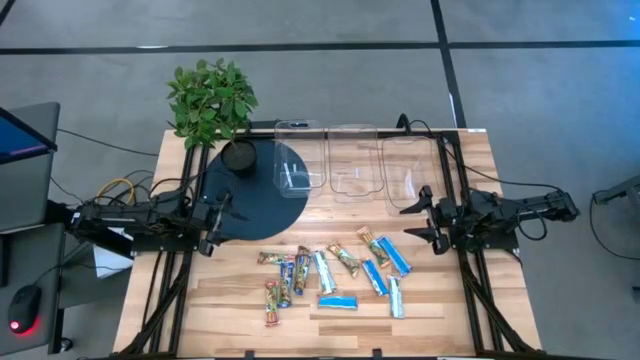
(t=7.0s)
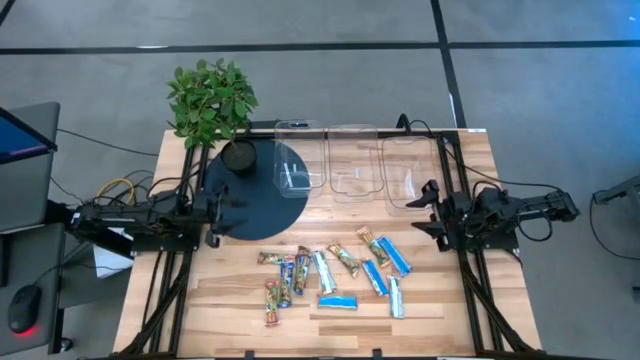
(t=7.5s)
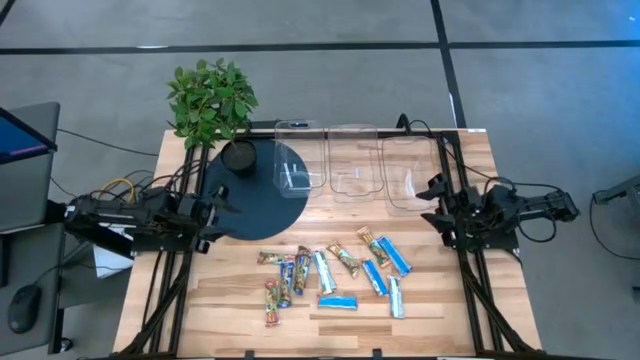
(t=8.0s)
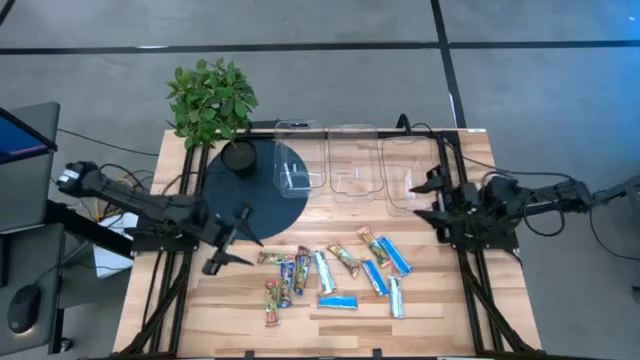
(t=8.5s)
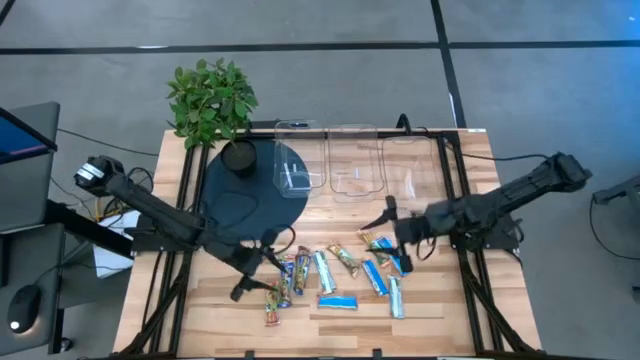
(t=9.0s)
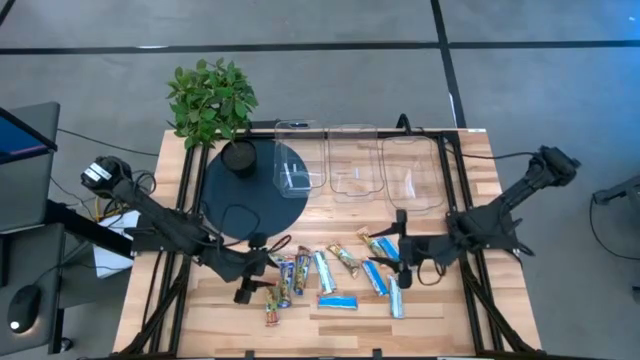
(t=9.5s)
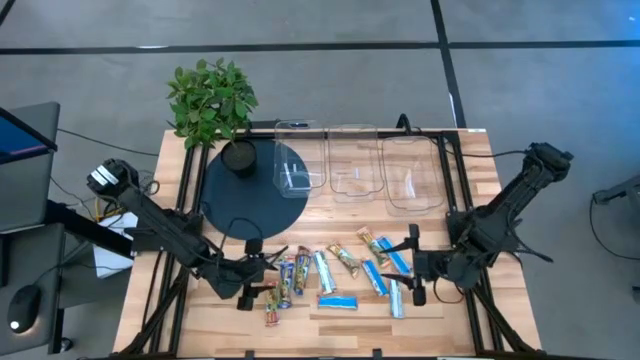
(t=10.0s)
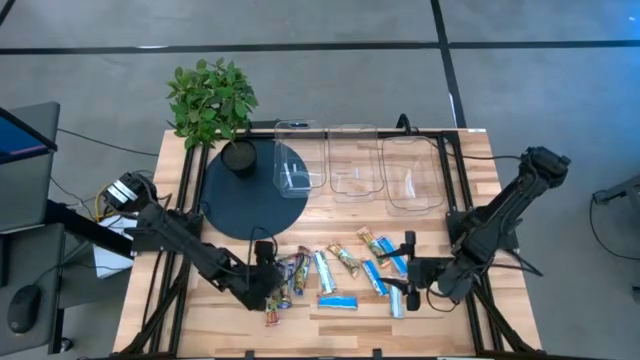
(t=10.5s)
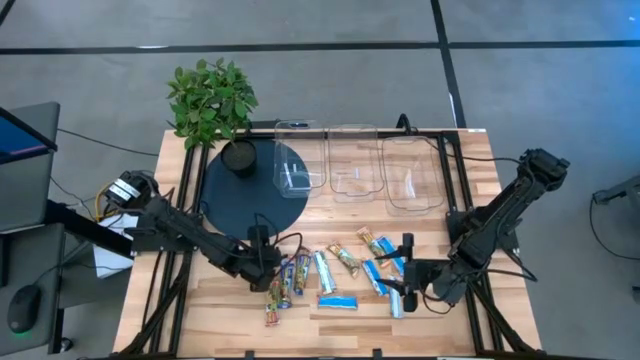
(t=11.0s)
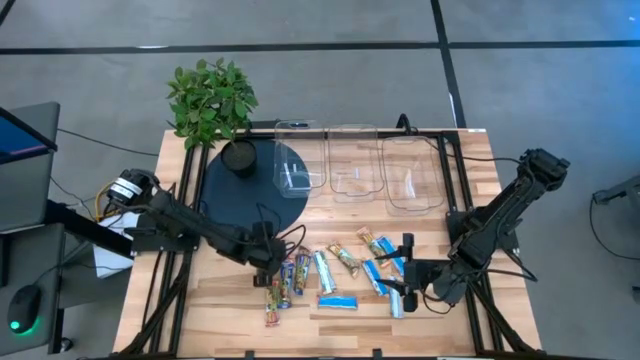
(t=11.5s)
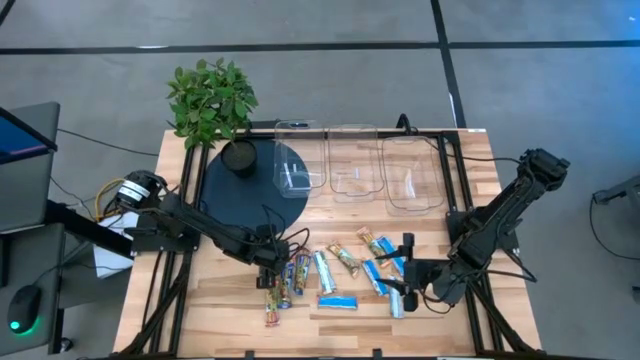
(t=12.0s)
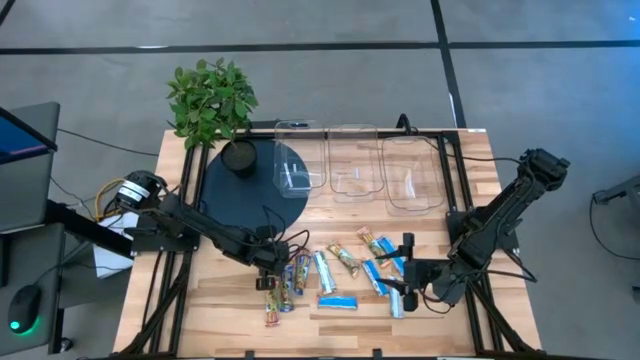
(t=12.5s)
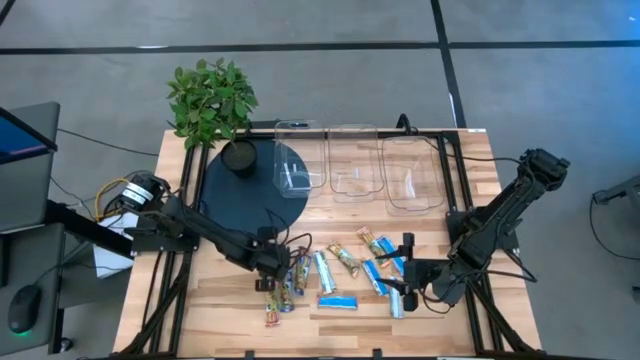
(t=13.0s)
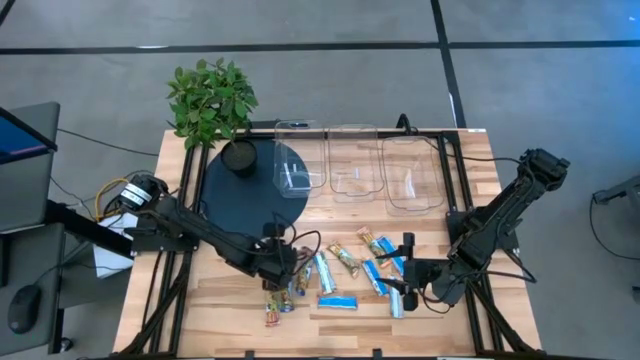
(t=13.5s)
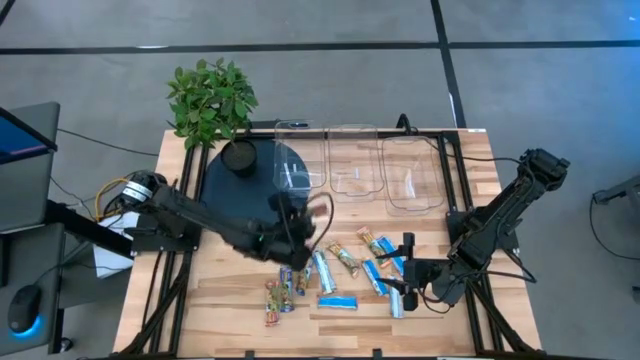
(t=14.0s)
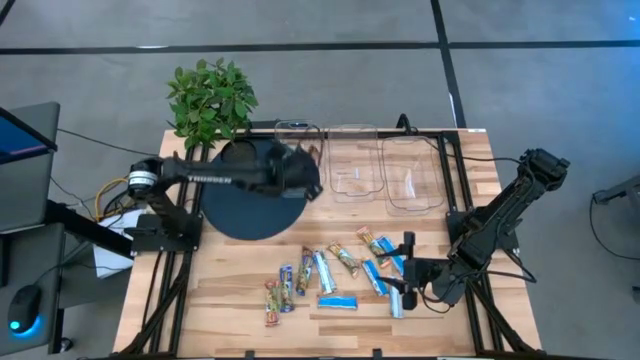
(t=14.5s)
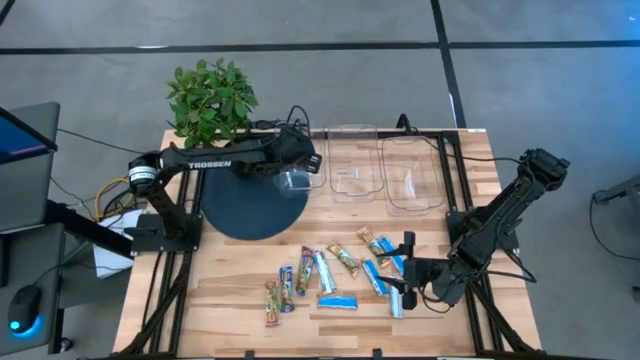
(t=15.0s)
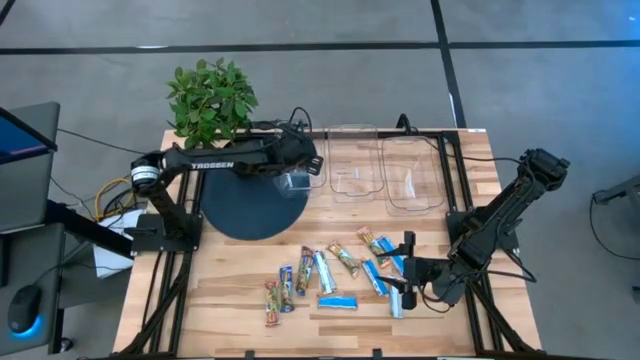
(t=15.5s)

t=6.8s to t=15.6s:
Task: Pick and place Granola Bars by type
Put the red granola bar into the left transparent bin

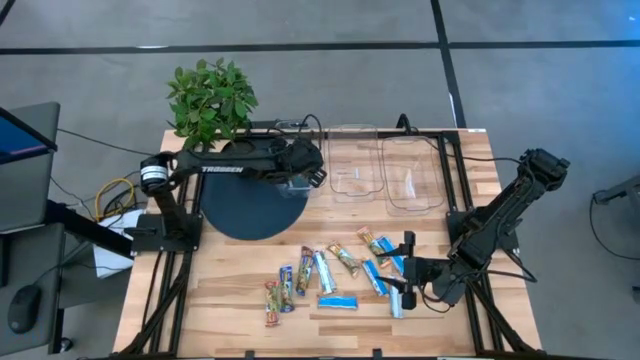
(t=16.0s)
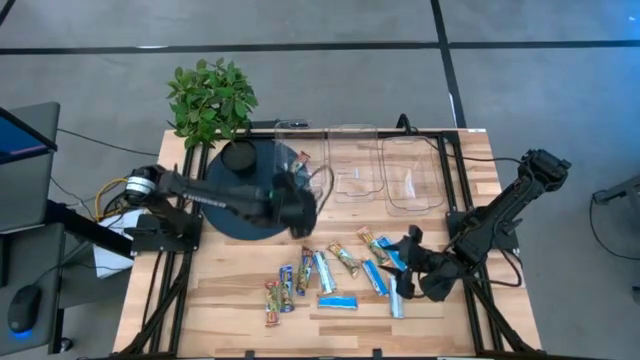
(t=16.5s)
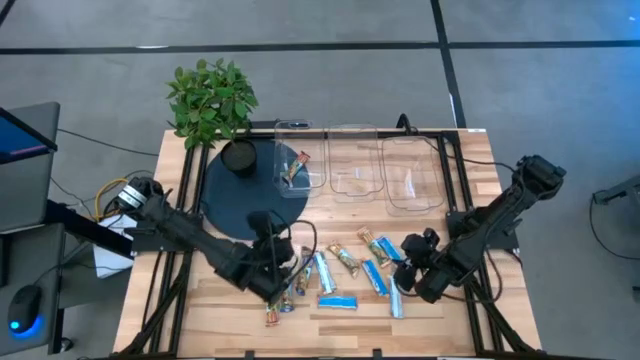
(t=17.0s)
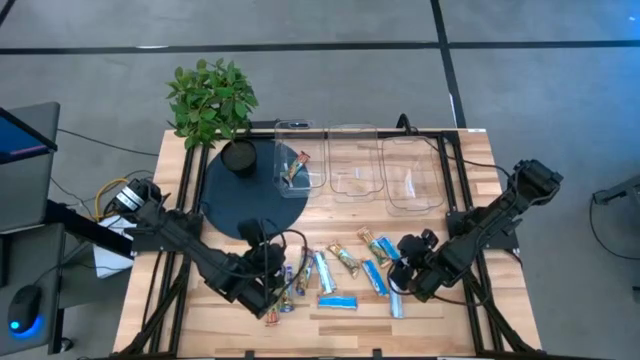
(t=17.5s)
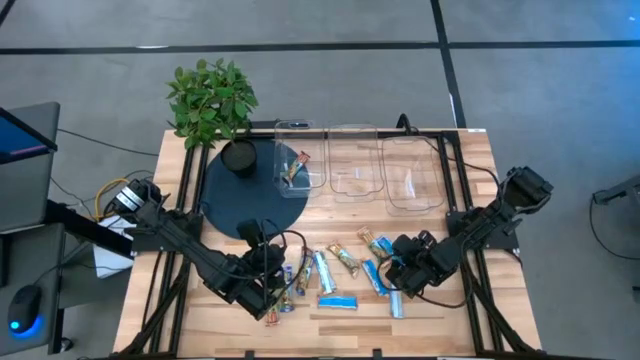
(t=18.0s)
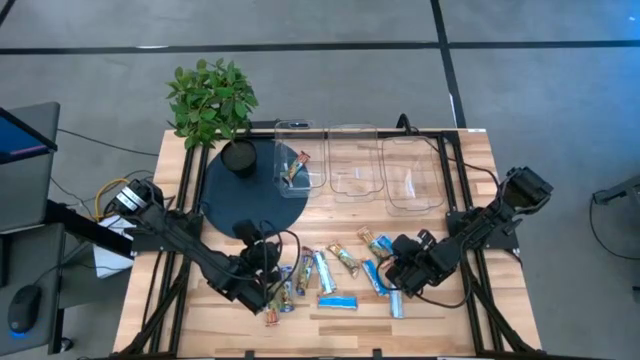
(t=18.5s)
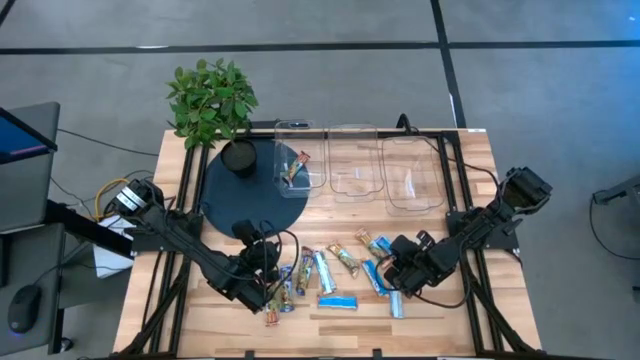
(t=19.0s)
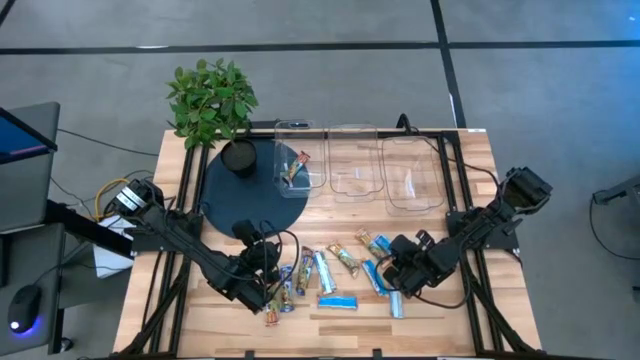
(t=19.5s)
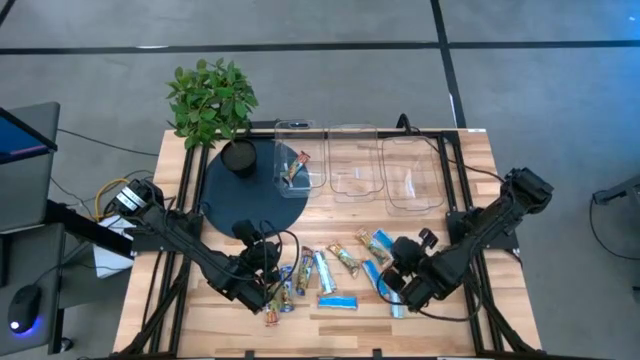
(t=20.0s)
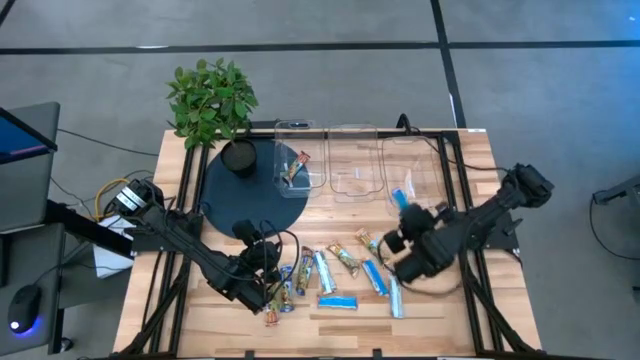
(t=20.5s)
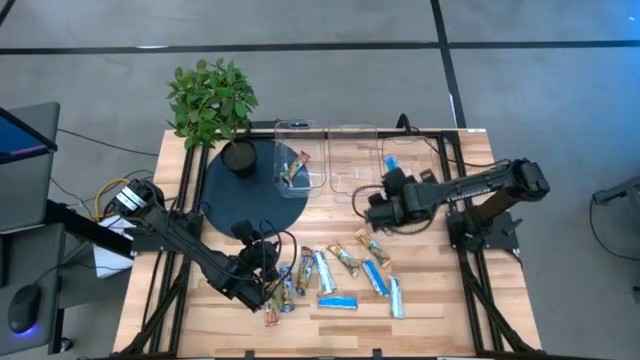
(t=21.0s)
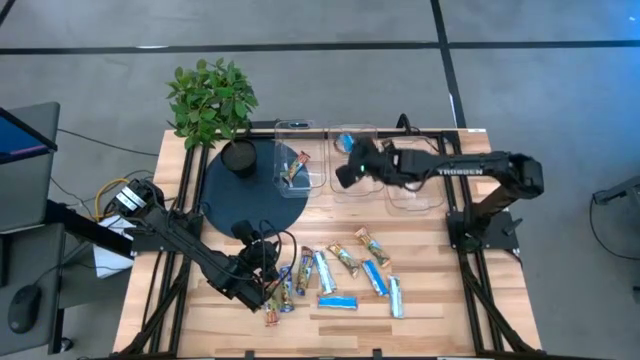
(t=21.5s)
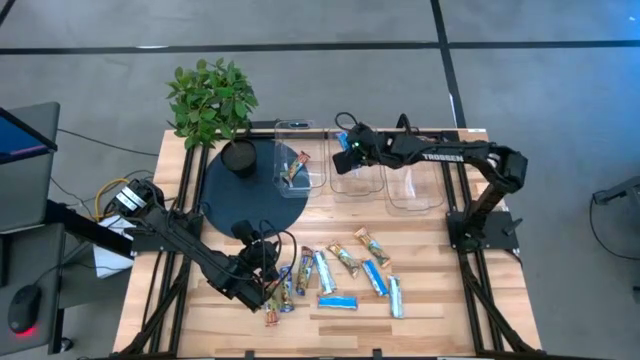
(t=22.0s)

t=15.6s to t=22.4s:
Put the blue granola bar into the middle transparent bin

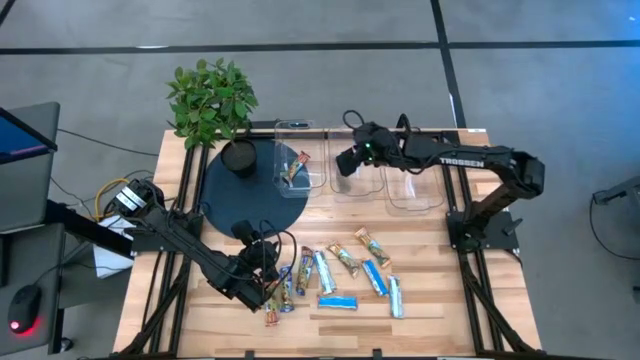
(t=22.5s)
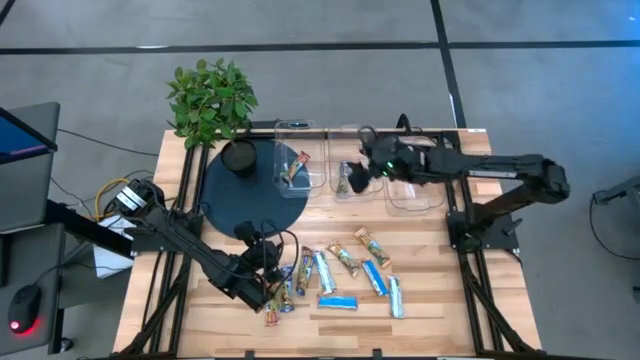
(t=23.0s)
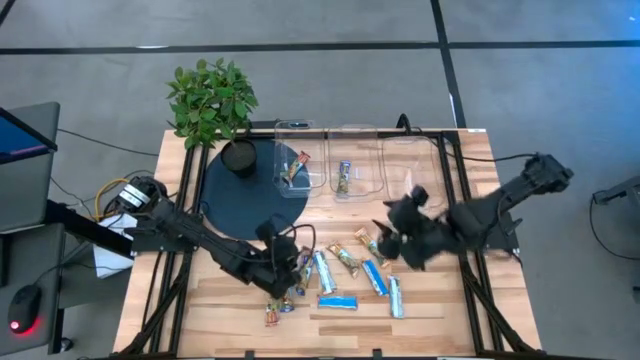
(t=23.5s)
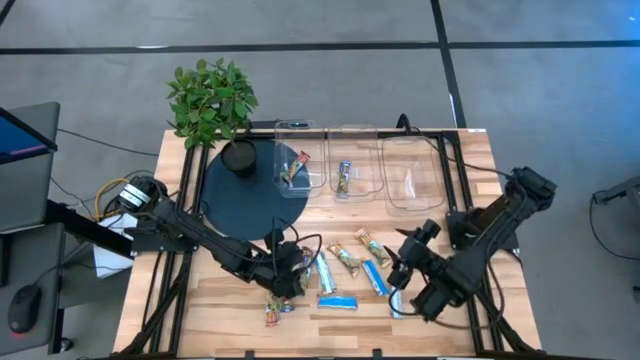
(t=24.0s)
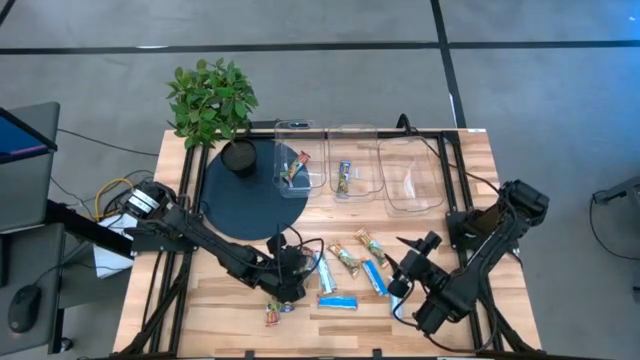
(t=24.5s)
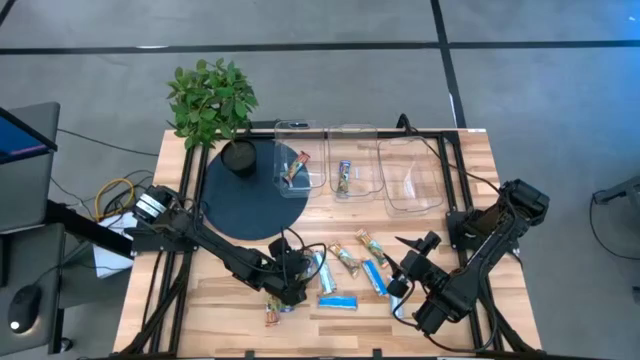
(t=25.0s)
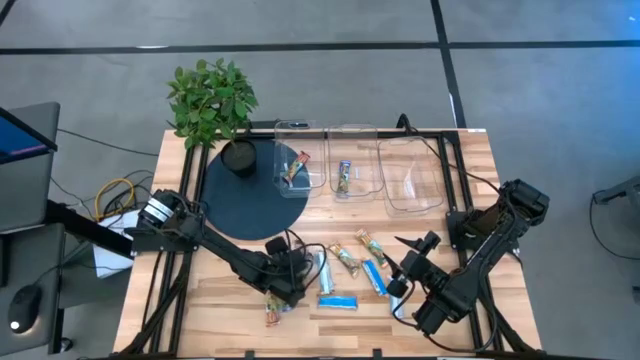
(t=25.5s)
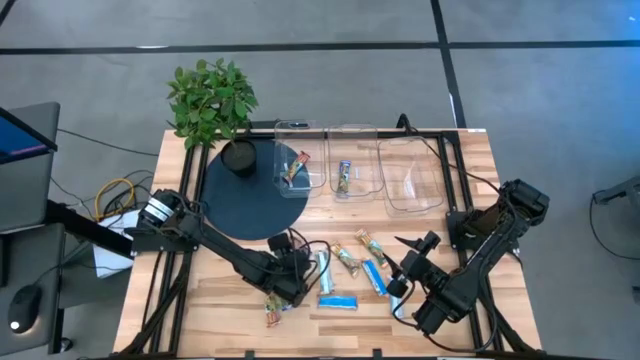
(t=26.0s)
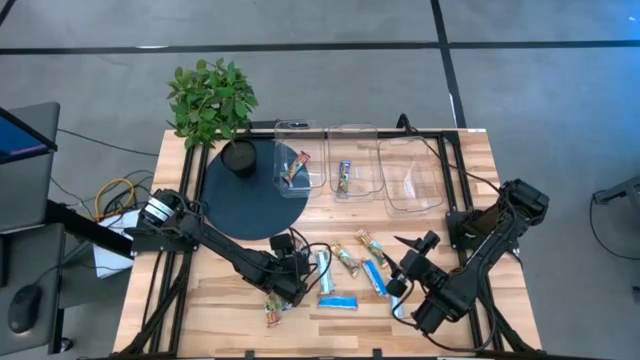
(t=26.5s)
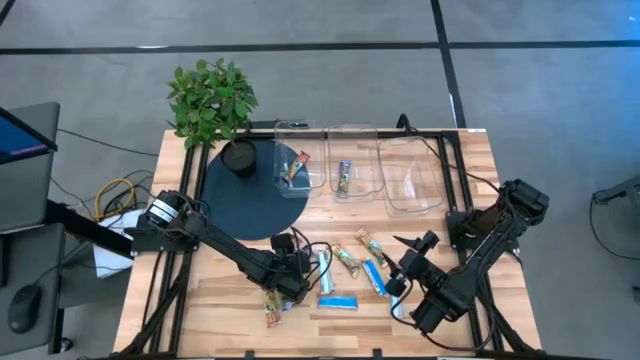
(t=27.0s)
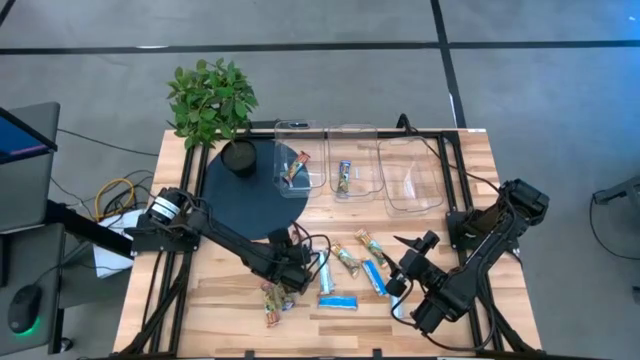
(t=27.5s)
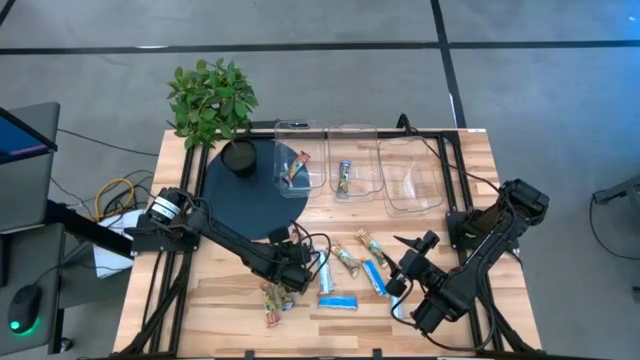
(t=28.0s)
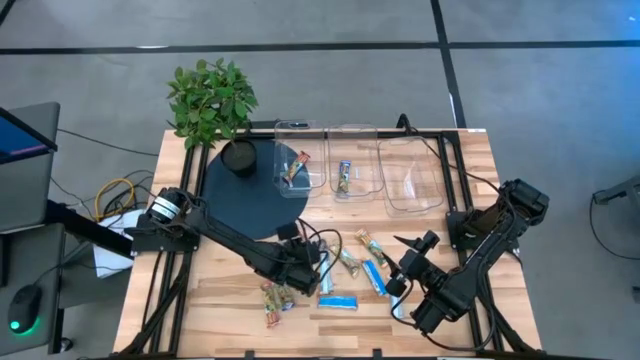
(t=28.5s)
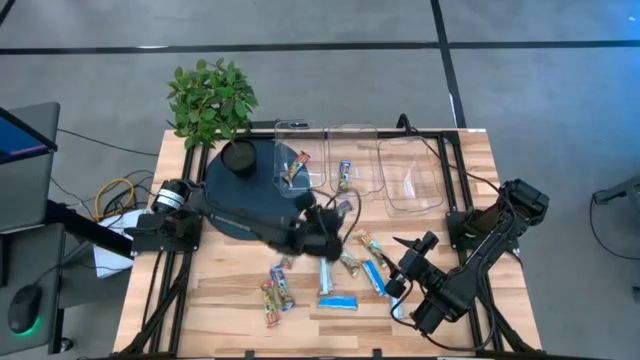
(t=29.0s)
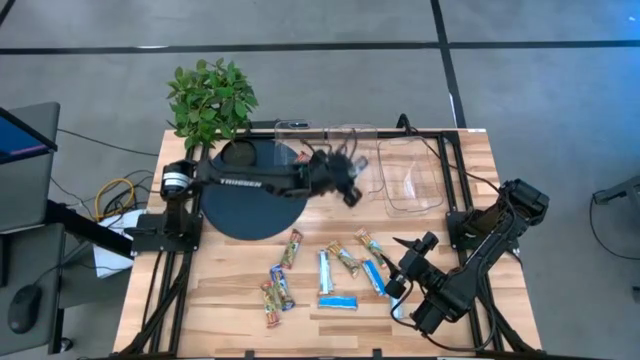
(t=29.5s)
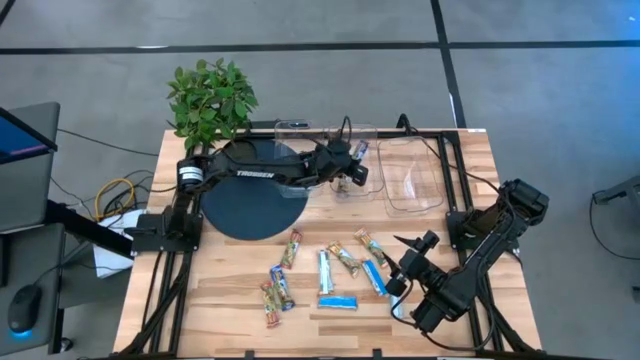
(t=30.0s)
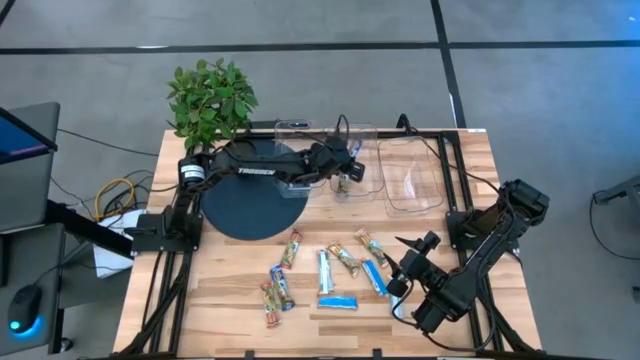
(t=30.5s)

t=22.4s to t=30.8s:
Put the blue granola bar into the middle transparent bin
